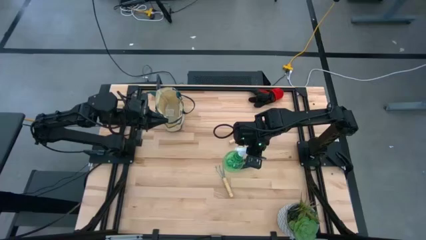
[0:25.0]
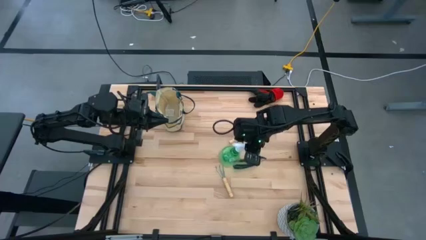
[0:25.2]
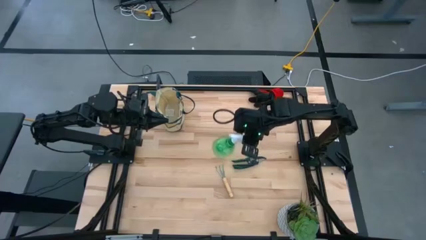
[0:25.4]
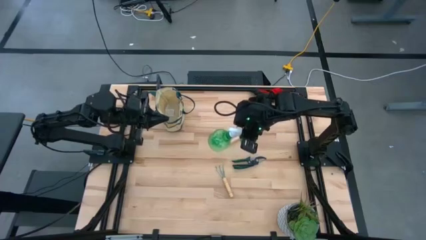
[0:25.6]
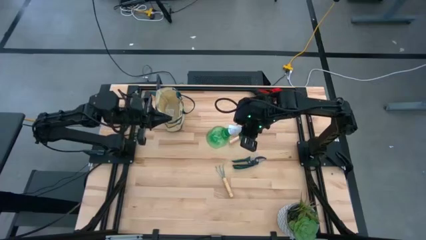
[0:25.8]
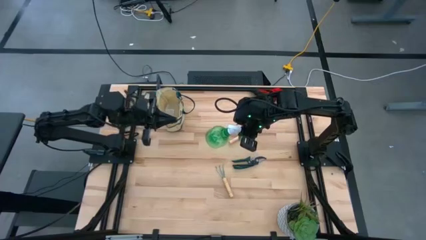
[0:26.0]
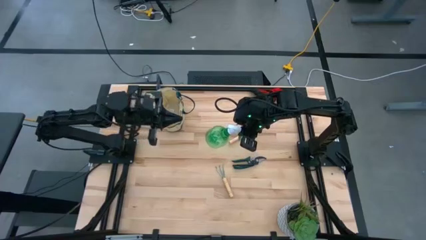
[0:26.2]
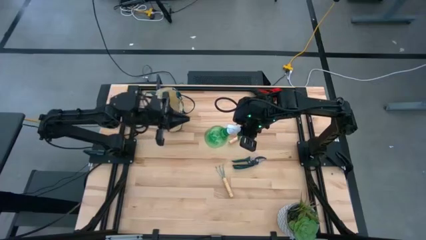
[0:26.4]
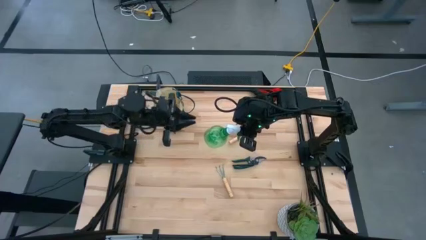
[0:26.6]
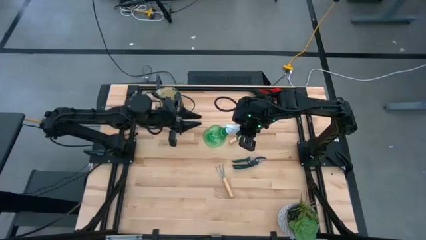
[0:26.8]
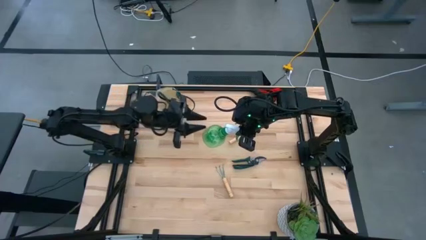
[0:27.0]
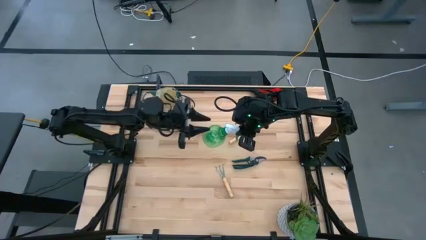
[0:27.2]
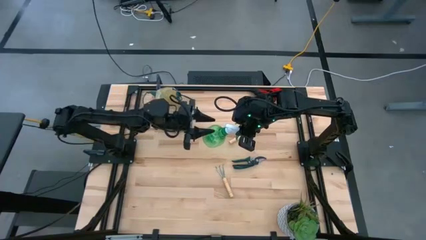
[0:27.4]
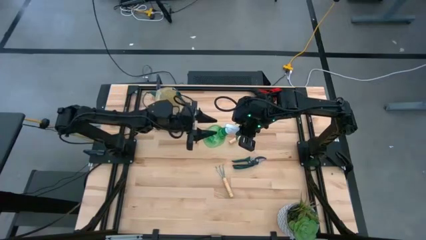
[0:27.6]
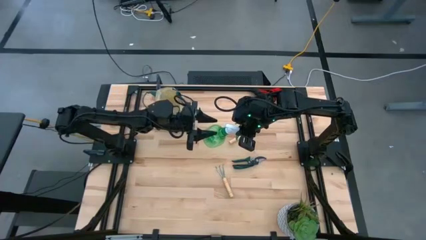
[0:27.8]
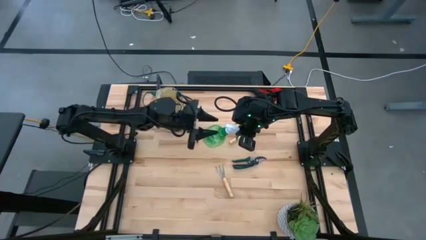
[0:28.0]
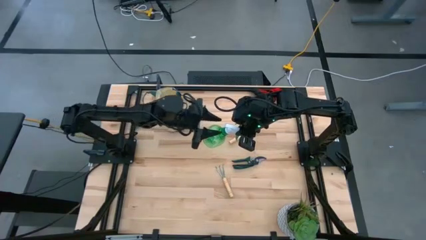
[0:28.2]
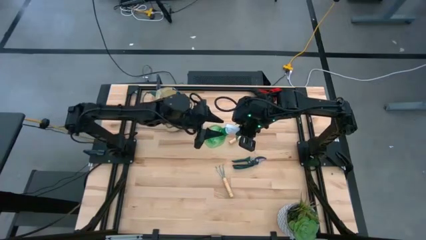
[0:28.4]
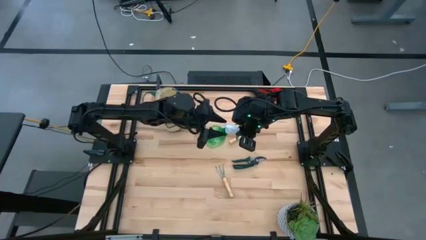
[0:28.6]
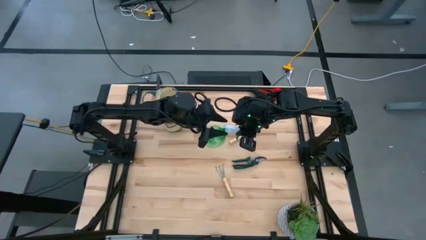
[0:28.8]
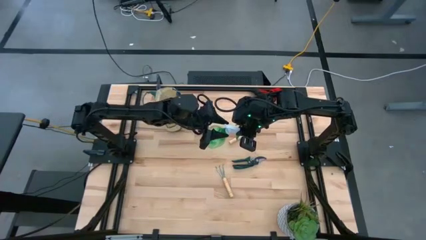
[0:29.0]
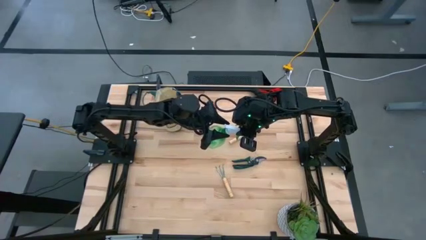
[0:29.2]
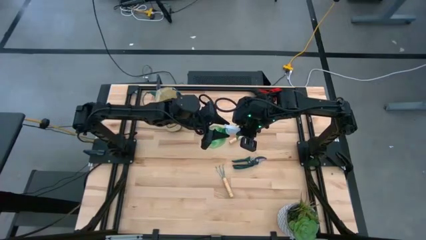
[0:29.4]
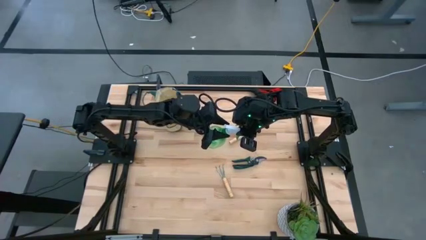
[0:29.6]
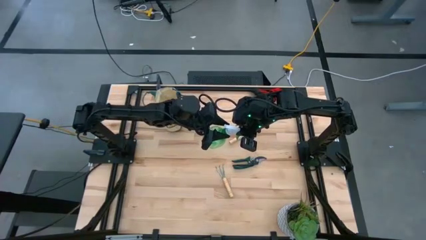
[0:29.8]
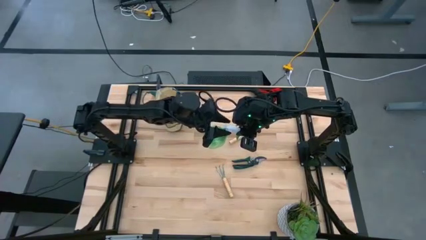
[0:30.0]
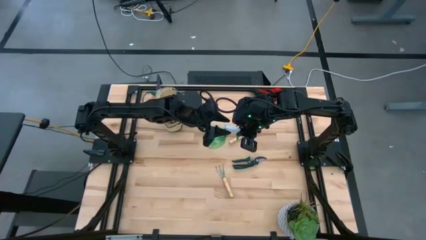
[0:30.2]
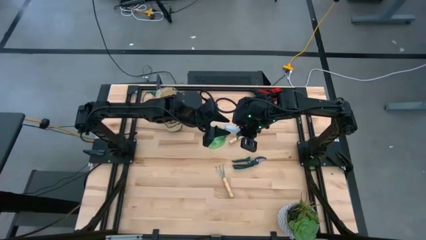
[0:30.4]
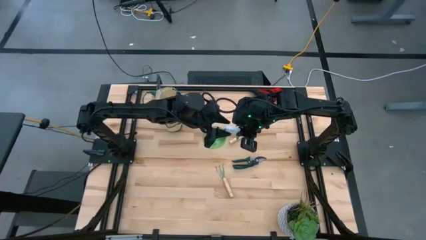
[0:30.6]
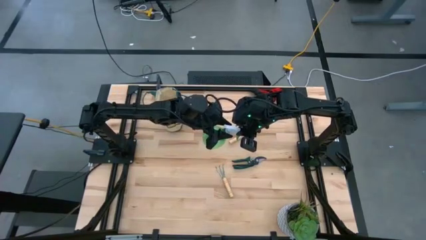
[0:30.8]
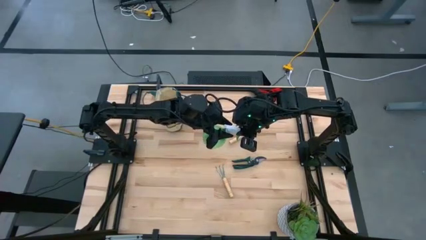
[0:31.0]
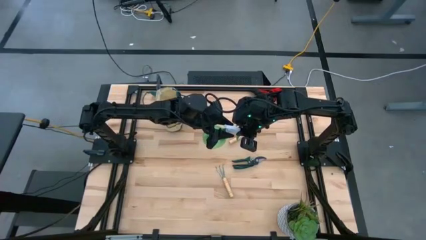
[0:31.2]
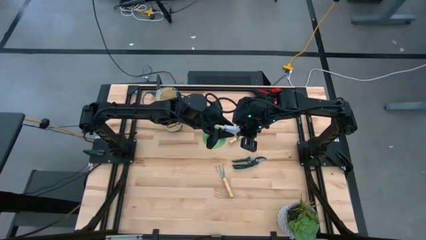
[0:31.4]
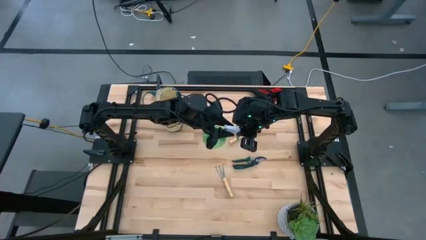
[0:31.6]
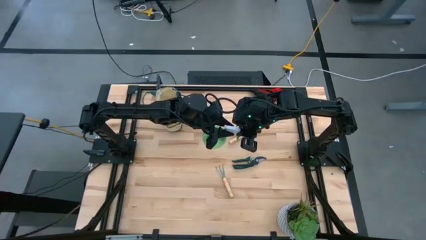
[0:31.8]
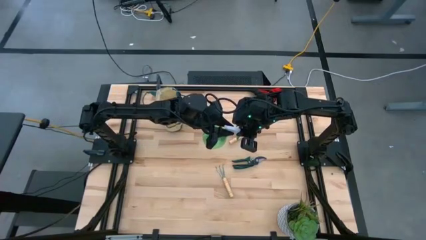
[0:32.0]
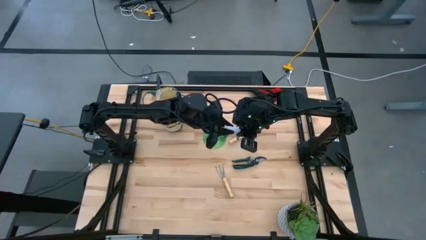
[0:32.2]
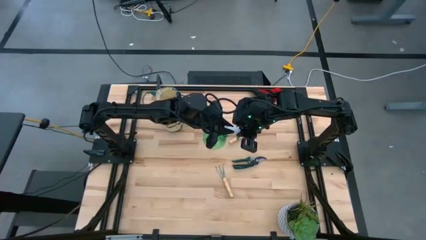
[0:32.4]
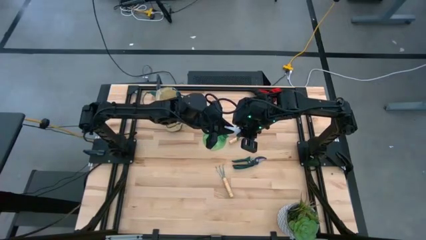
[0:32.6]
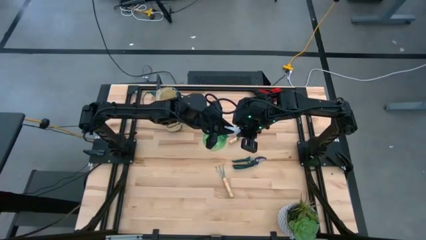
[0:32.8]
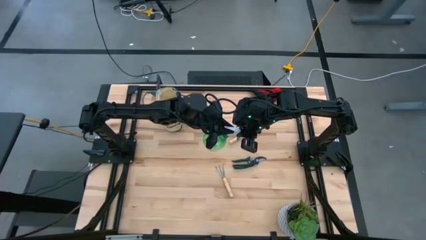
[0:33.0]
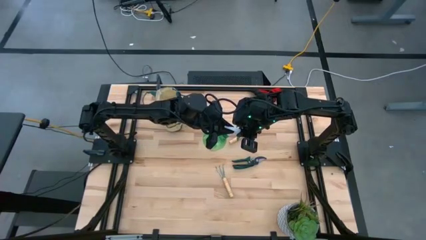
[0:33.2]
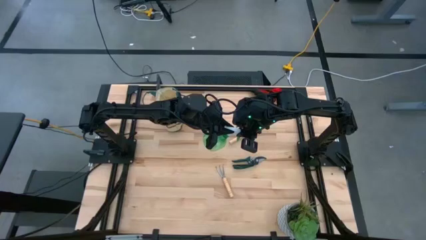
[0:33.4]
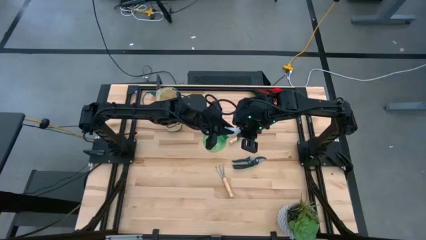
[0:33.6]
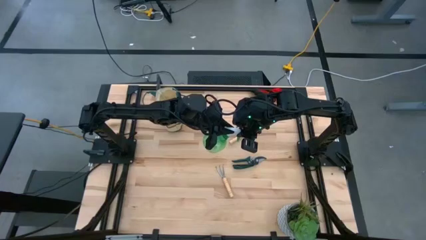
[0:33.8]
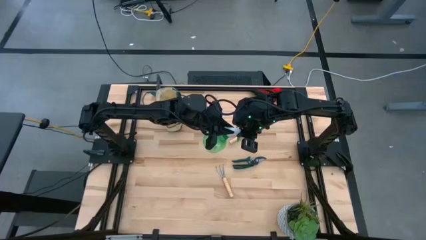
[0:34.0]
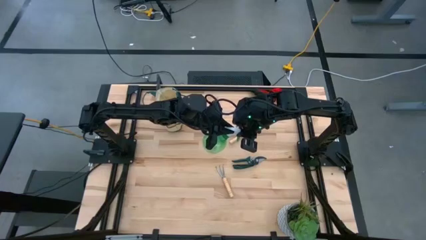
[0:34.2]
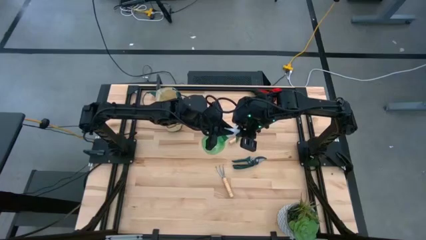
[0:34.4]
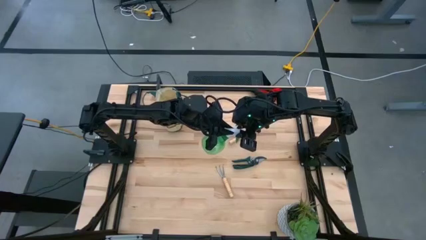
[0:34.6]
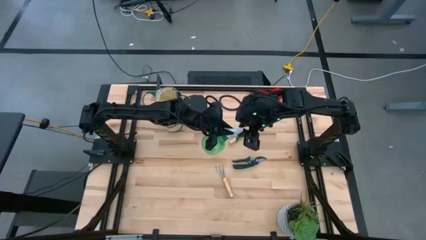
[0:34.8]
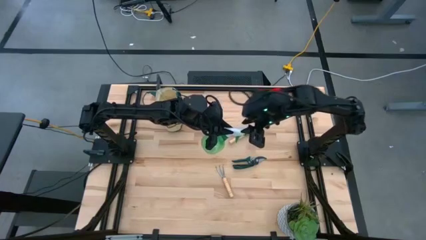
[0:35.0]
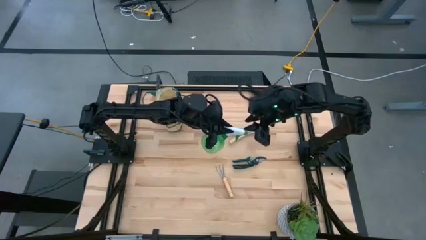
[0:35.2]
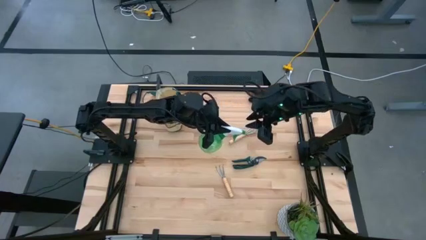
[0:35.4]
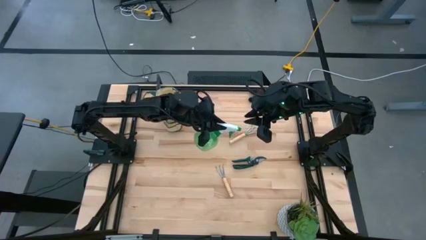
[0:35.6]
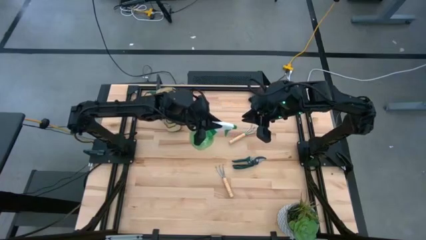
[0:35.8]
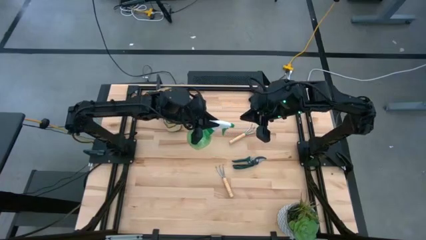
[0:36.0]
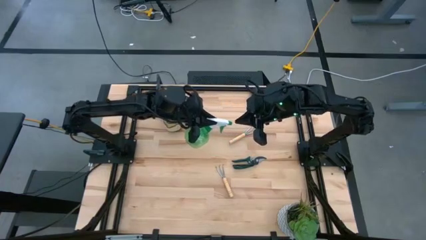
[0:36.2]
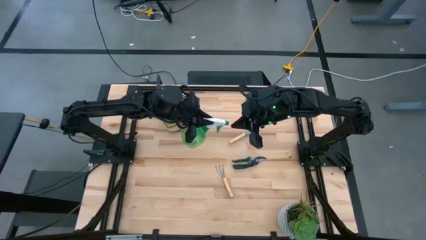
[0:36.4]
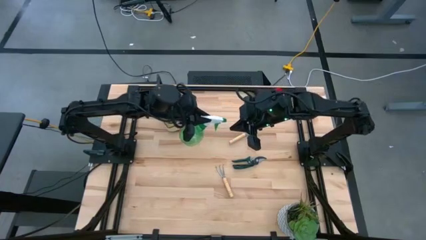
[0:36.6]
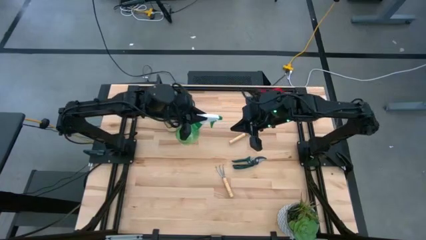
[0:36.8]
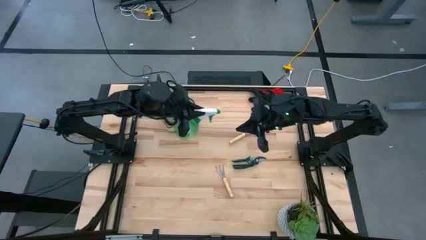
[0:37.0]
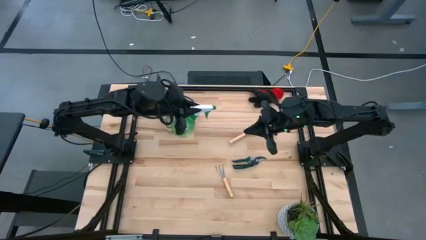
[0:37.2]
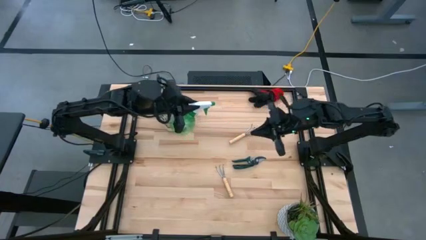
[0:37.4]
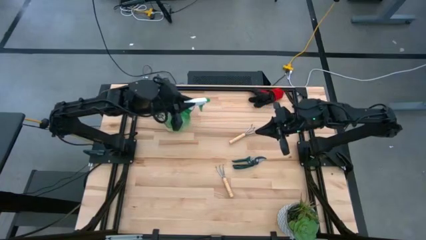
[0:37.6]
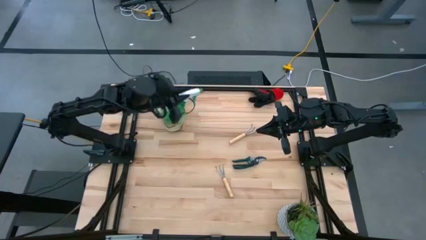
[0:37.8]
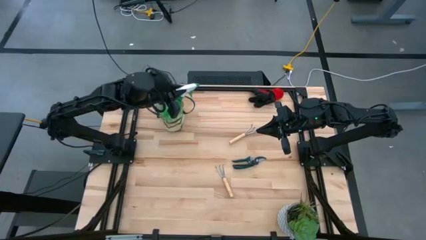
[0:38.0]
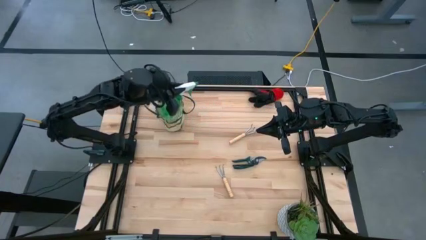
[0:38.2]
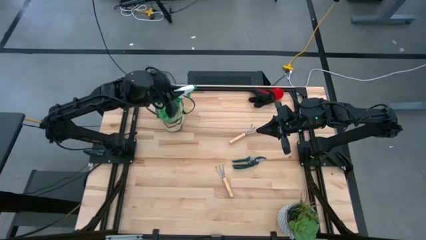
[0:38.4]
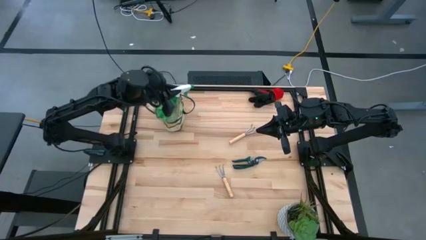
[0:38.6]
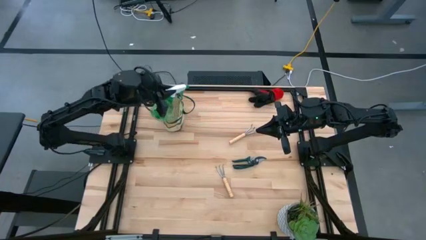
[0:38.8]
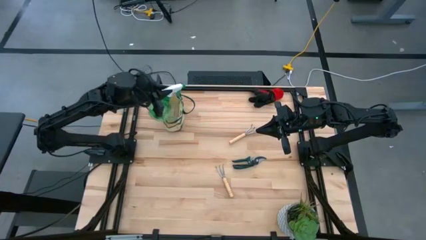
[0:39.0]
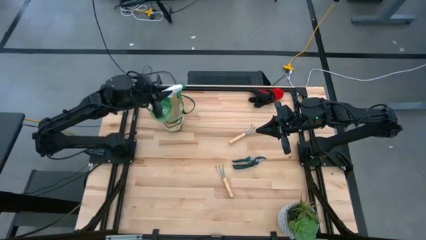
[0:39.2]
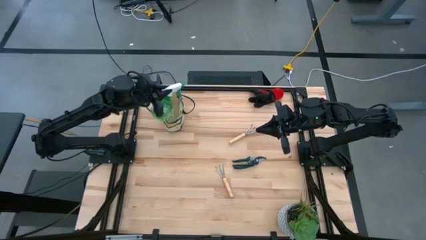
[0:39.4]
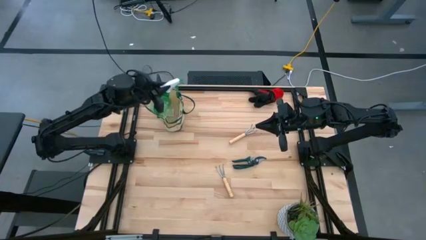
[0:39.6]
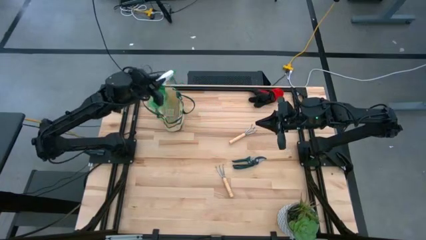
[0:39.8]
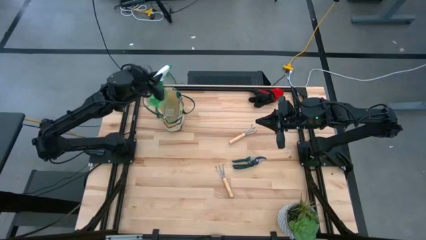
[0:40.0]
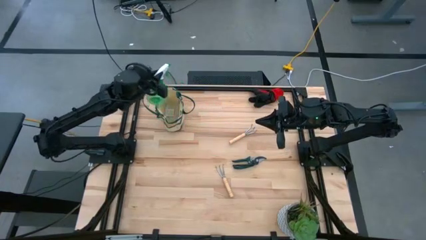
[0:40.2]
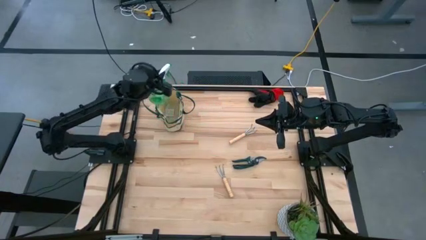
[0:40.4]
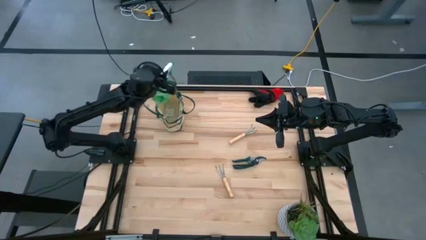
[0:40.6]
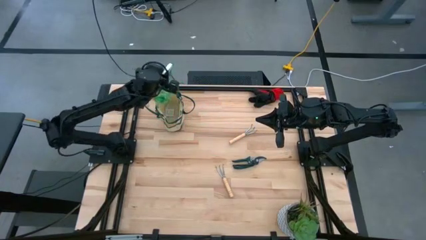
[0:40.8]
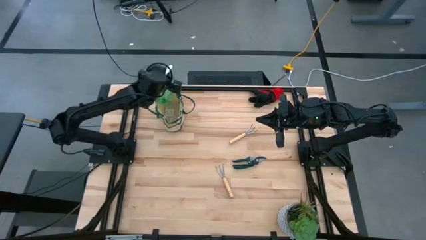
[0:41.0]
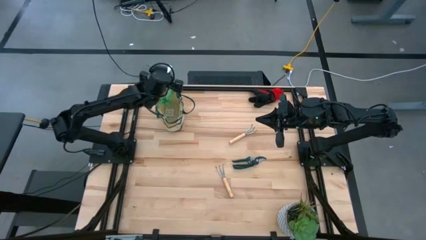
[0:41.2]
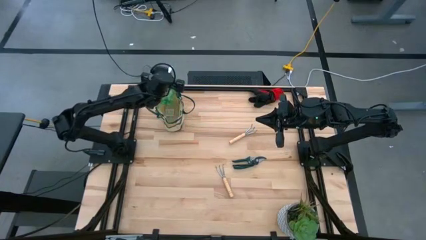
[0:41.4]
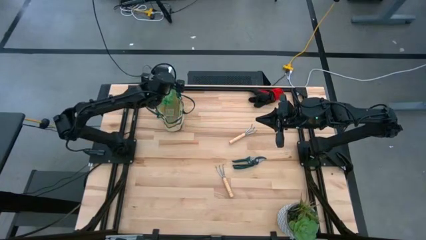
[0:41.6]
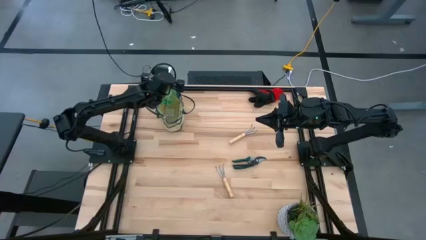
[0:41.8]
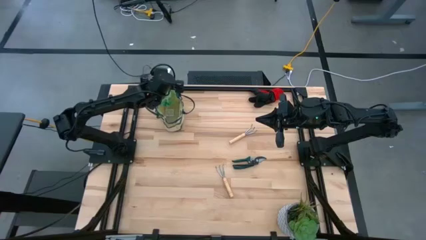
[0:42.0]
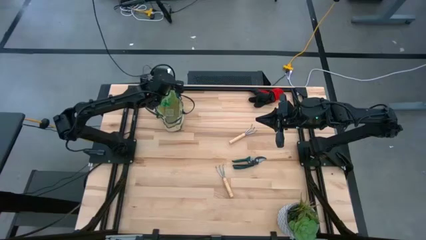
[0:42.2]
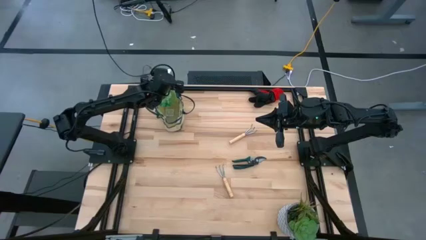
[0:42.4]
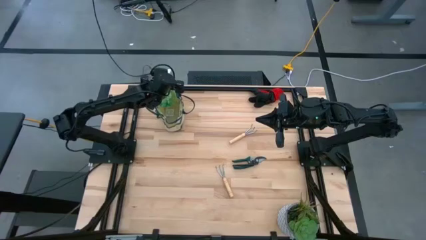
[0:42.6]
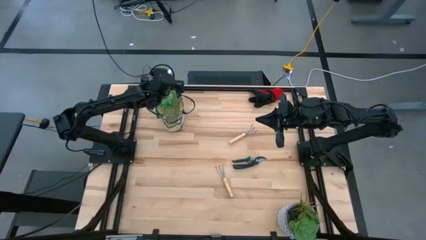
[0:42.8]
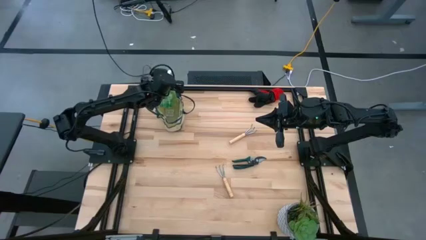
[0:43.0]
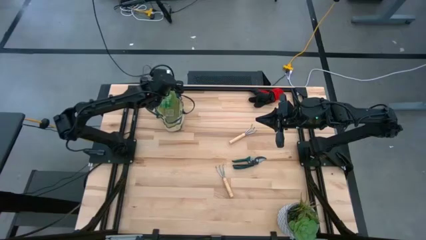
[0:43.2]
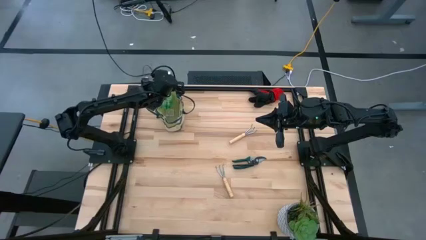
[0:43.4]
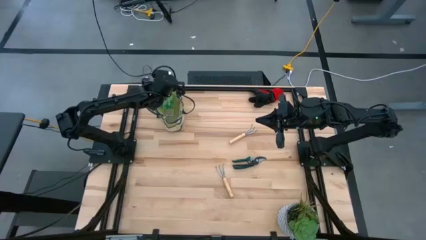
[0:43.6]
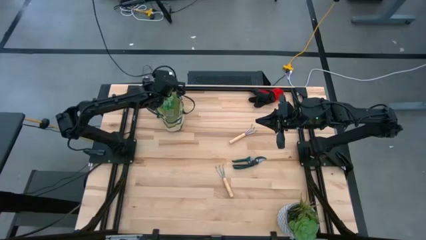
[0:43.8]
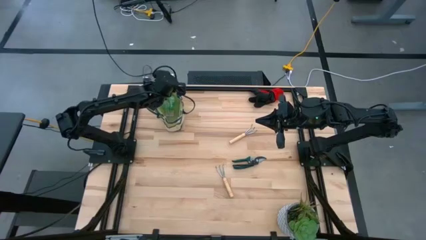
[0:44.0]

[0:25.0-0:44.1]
Task: Pick & Place Garden tools in Gardening bag
Put the green spray bottle into the gardening bag
